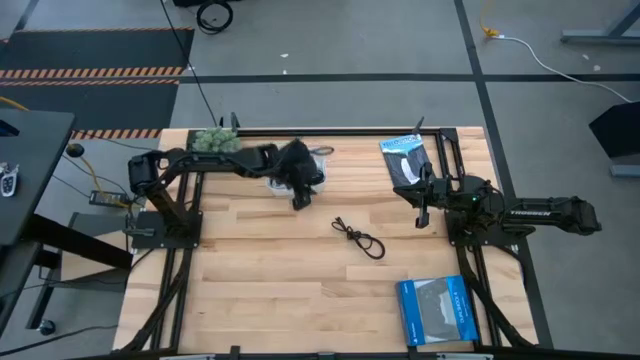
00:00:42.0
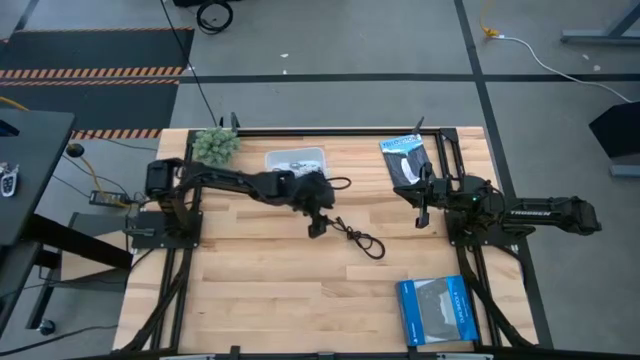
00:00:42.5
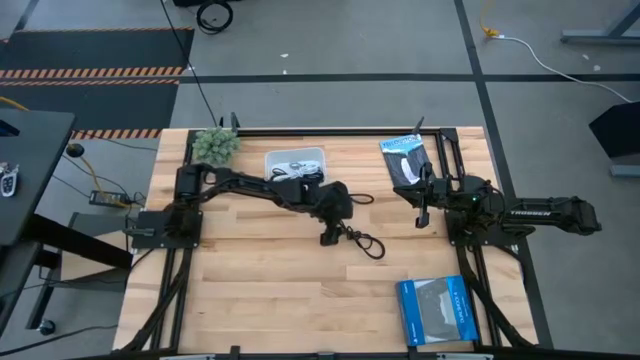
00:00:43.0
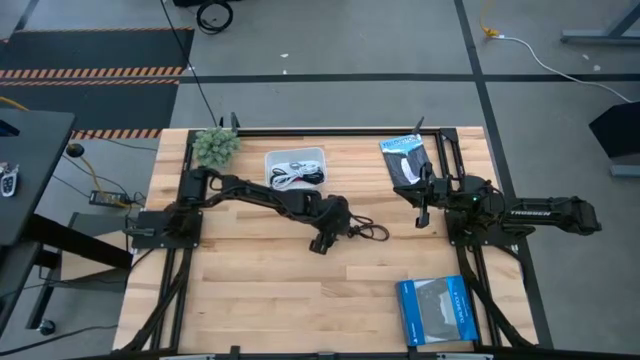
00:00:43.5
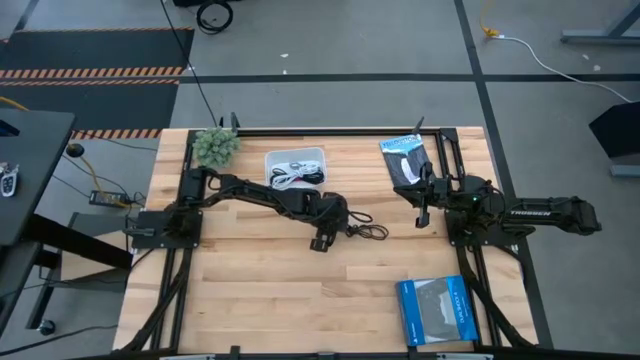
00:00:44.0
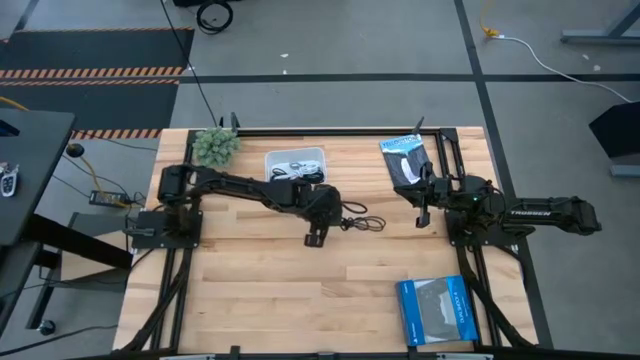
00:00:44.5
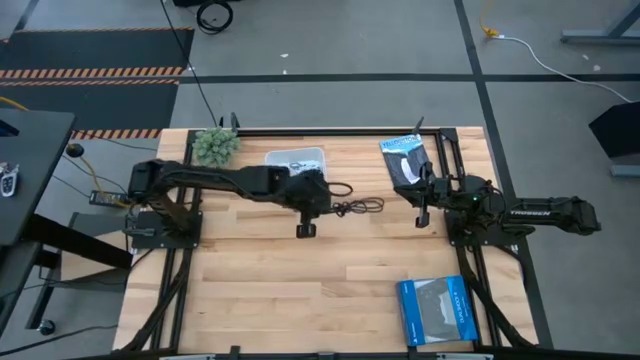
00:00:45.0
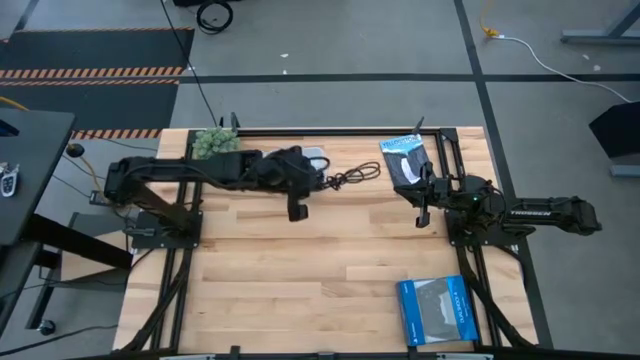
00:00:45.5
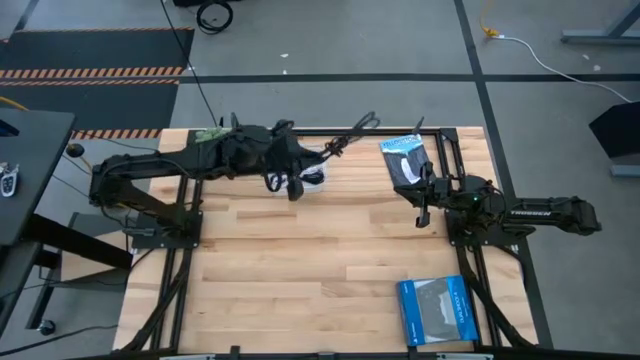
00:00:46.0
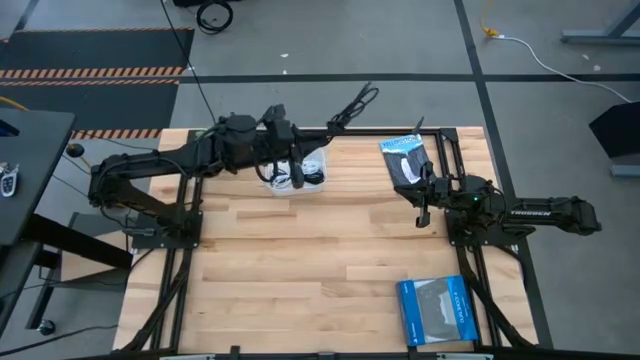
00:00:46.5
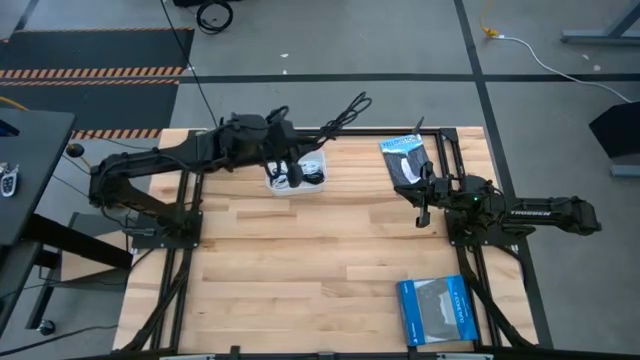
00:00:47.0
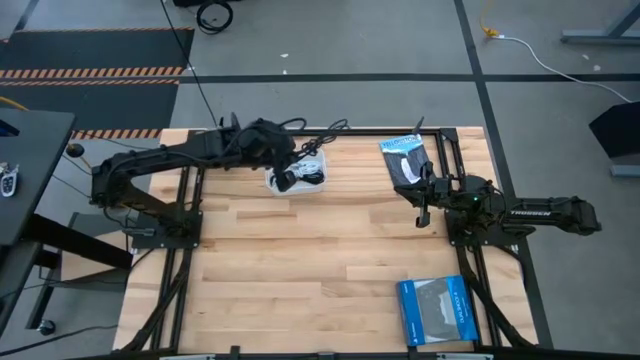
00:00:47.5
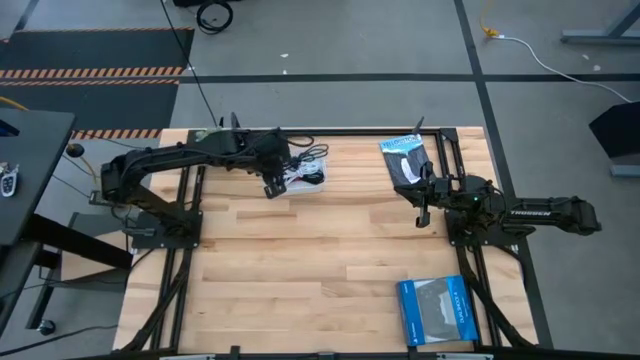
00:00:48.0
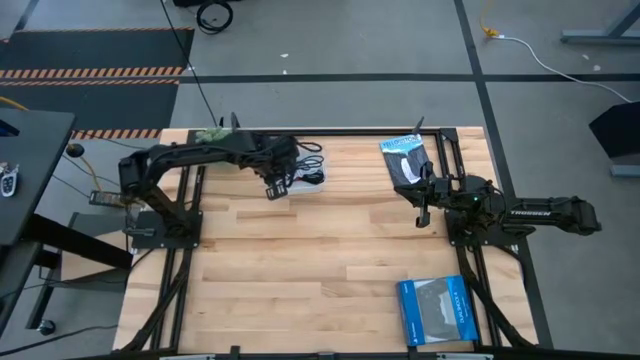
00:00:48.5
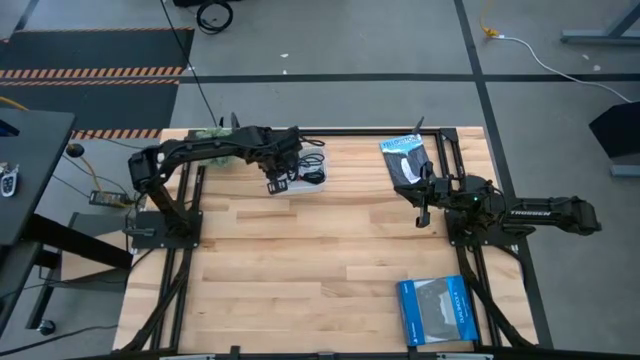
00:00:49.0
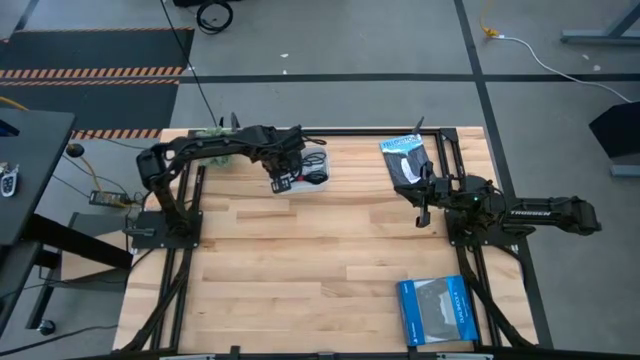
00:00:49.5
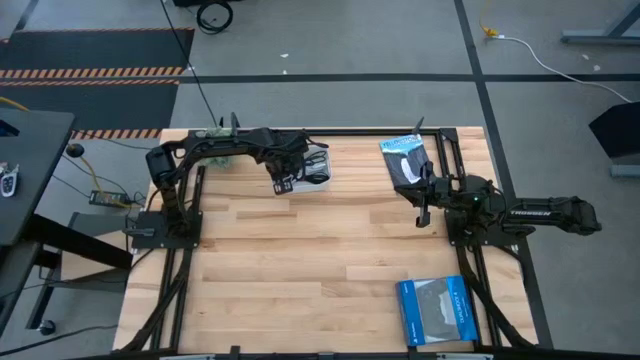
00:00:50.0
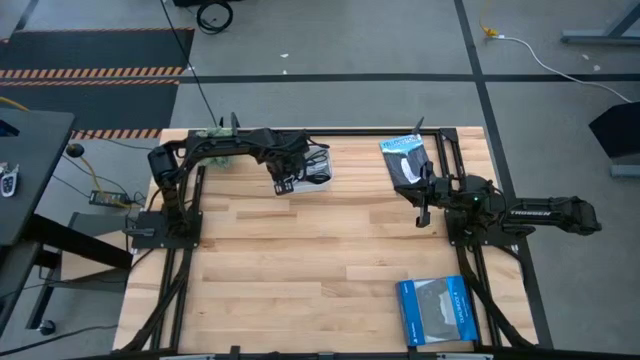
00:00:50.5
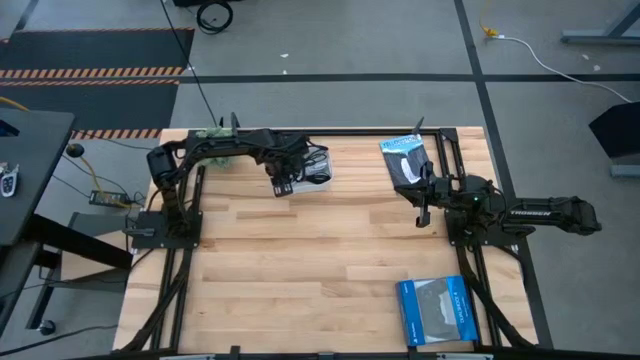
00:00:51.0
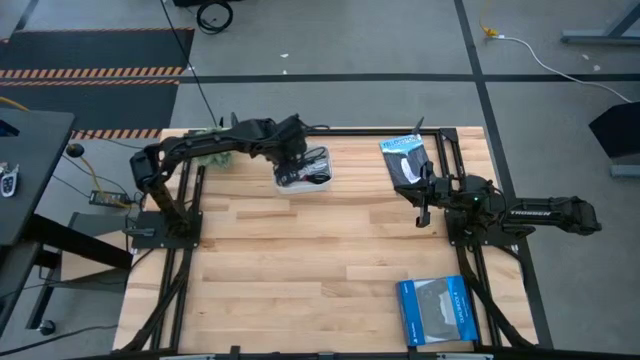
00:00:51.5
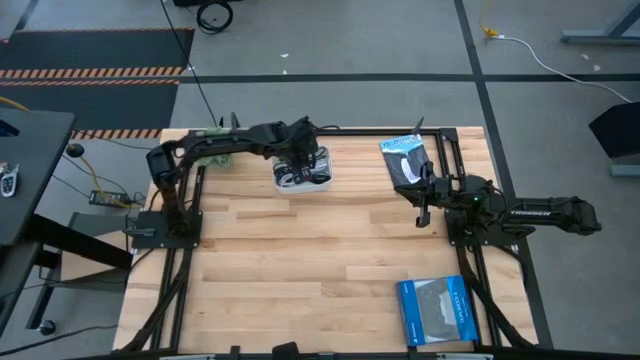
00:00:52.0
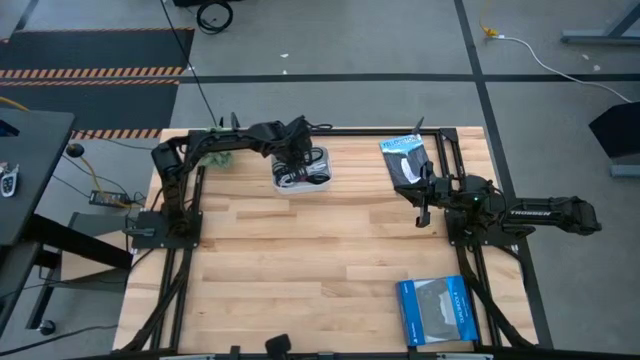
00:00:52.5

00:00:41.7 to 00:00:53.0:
Task: Pick and place USB-C Cables
Put the black charger cable into the white bin

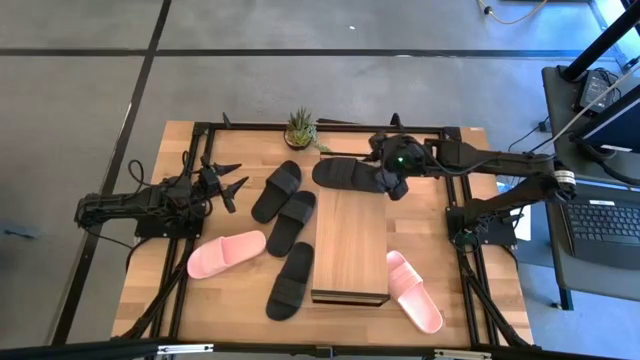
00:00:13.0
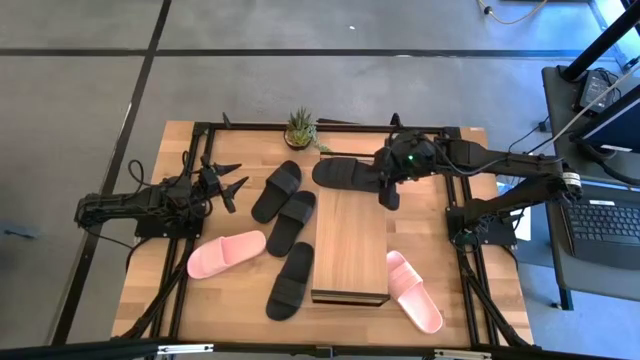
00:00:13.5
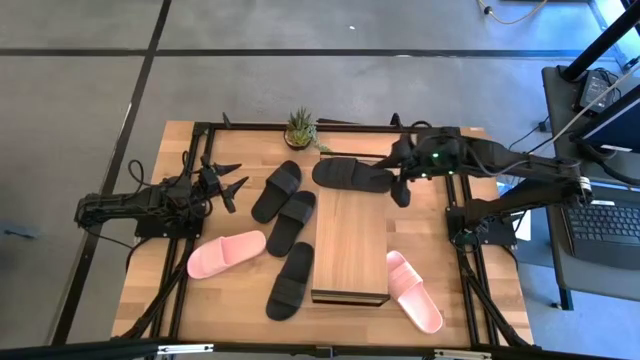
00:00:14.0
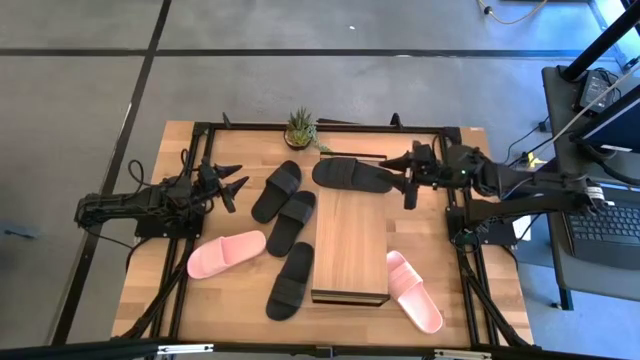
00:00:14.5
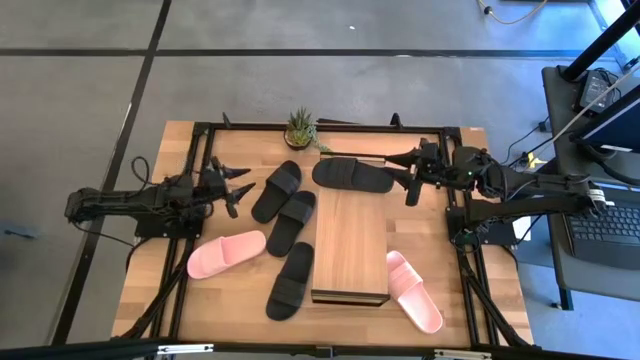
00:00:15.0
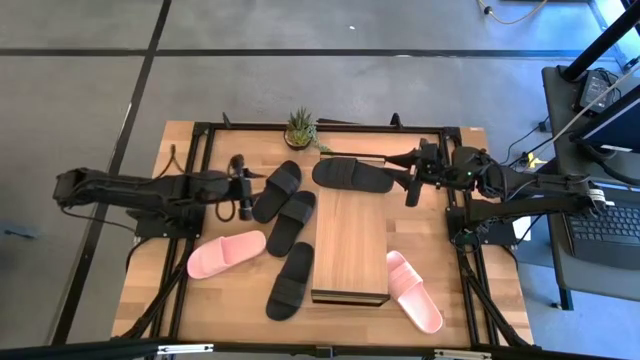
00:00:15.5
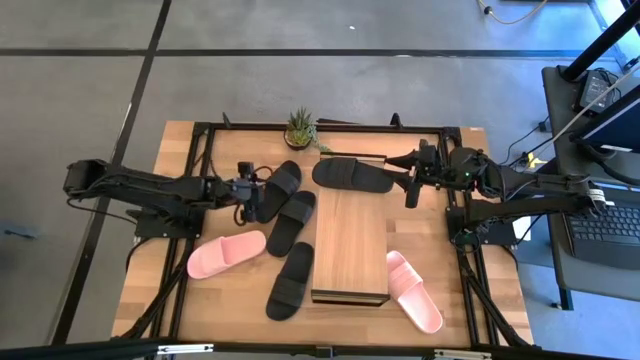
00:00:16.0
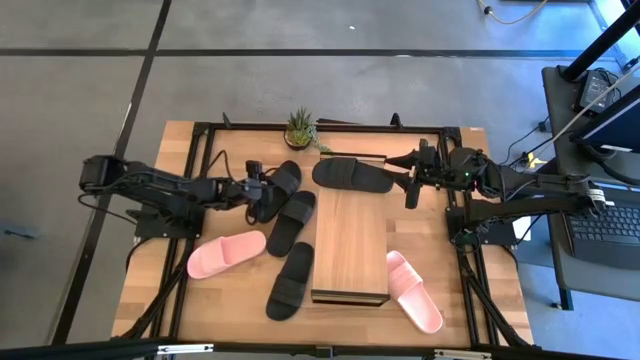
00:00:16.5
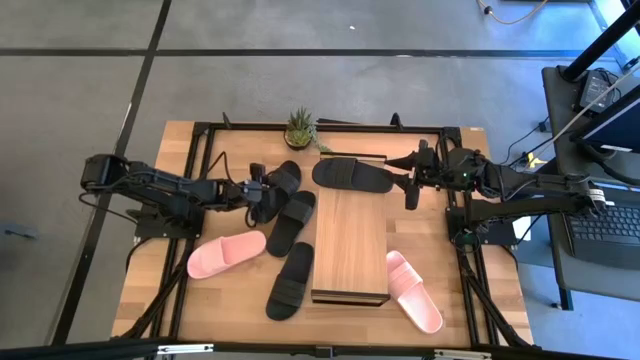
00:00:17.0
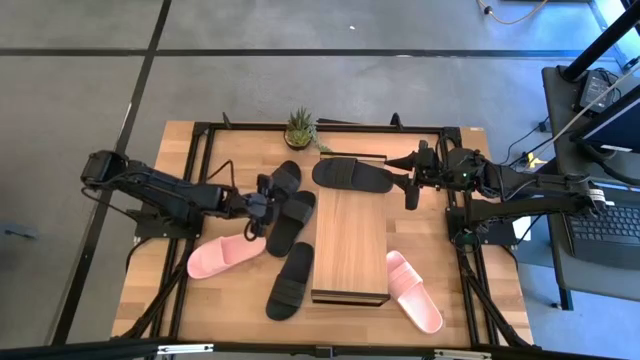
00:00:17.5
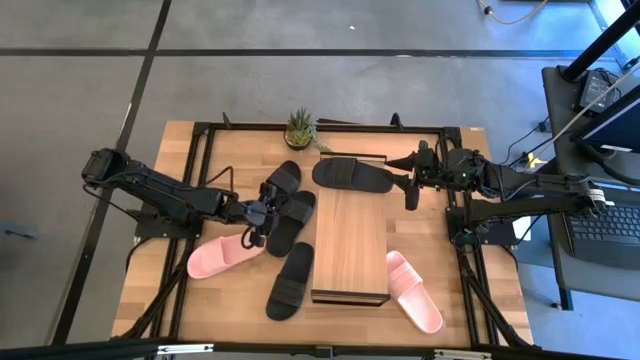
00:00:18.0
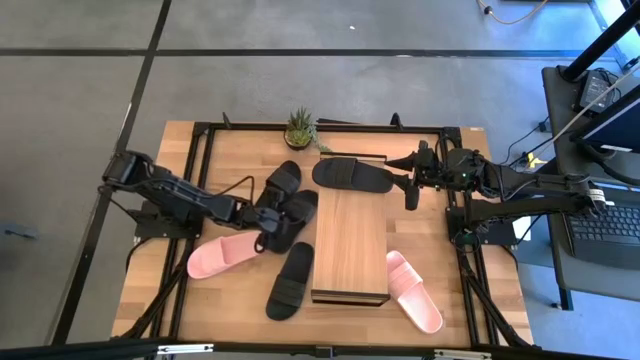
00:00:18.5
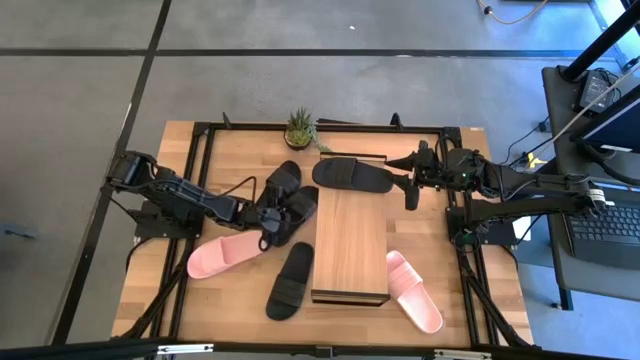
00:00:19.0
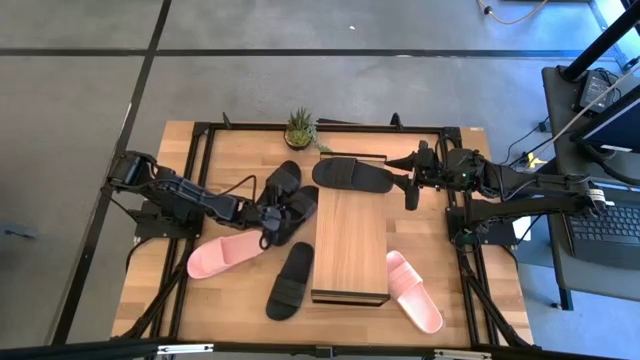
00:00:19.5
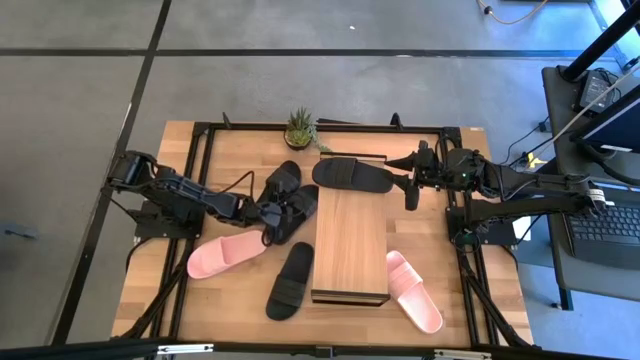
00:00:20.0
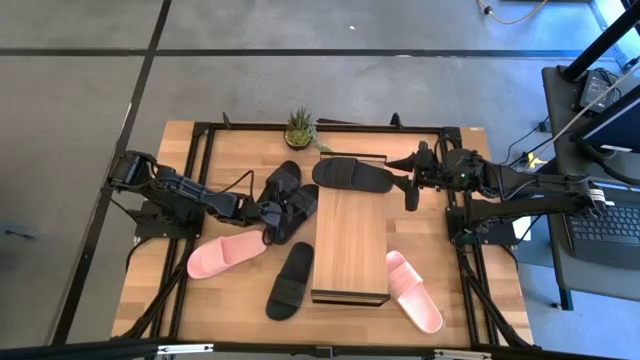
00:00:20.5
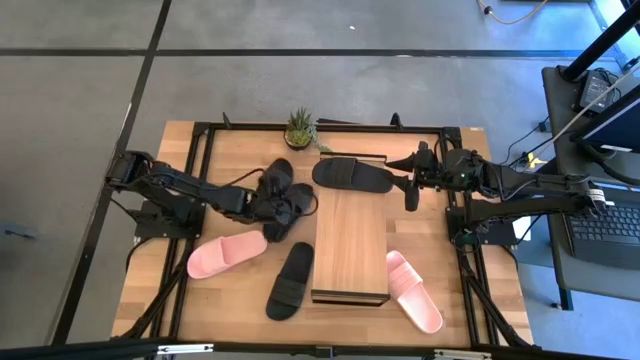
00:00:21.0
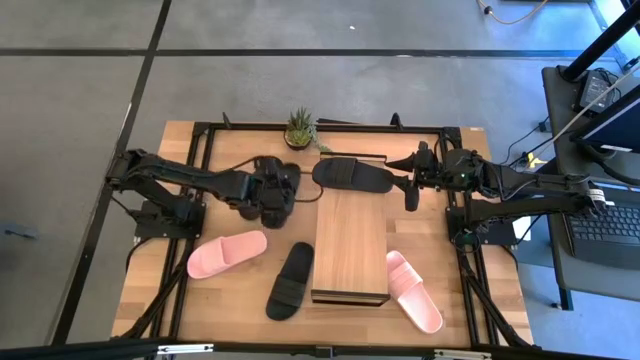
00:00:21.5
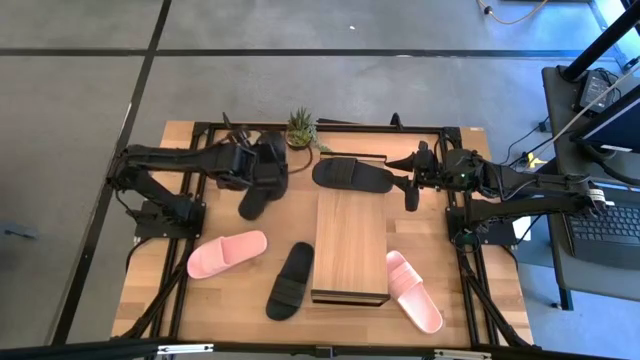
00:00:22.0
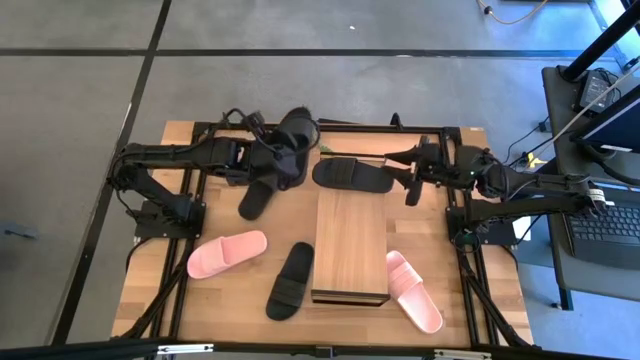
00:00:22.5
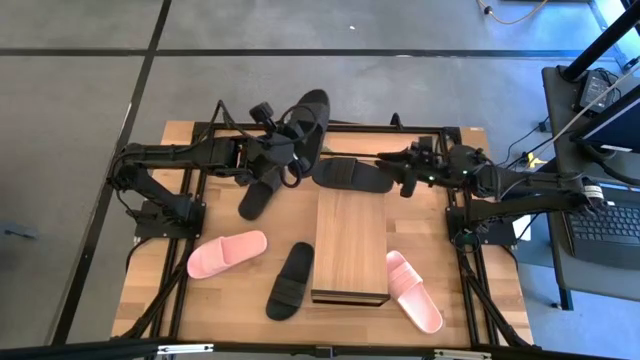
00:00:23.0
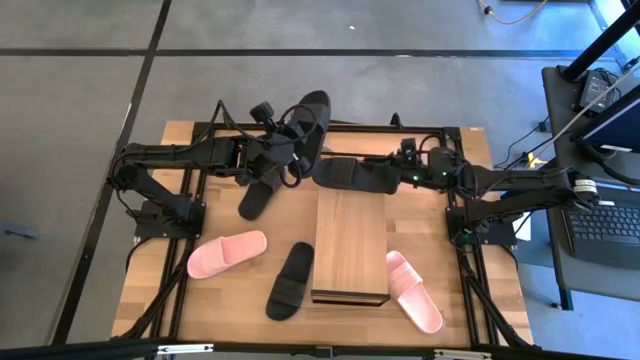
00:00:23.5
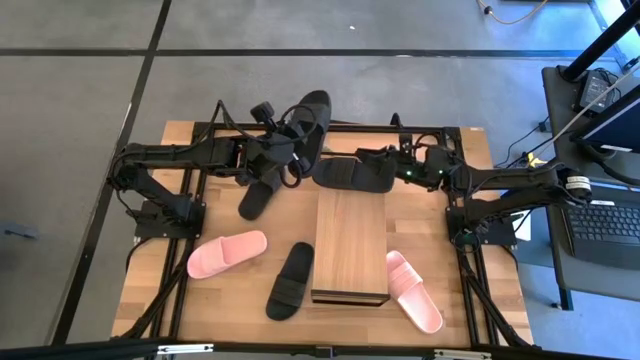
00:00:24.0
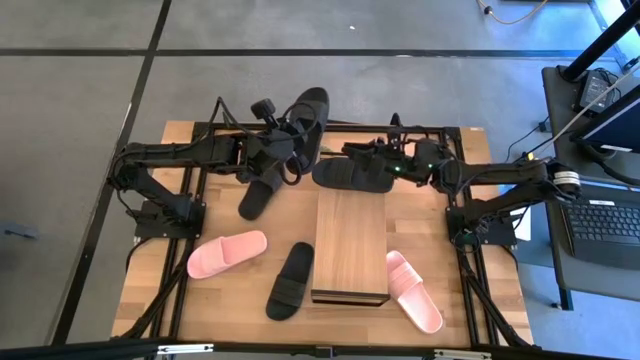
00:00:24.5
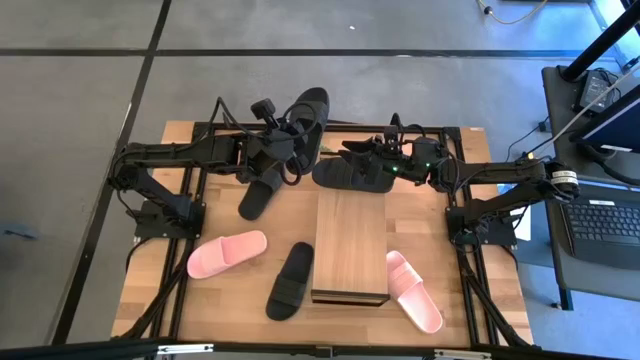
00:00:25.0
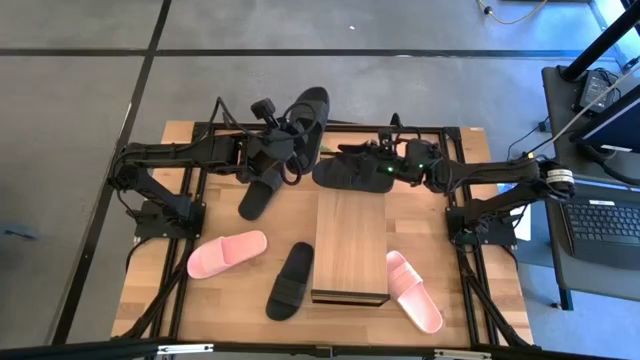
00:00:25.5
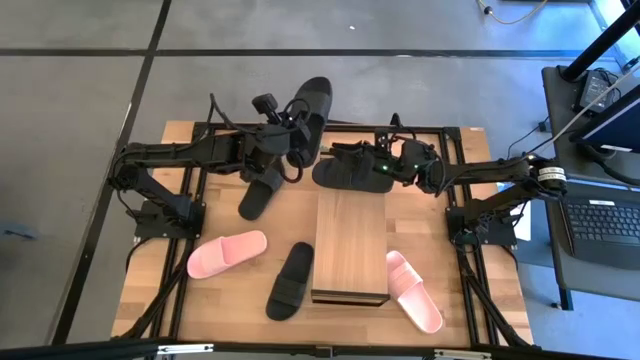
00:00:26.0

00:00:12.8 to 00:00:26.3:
Task: Pick and place slides into the shelf
Put the black slipper on the shelf
